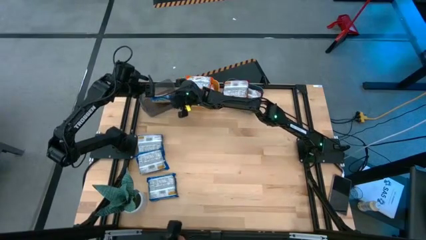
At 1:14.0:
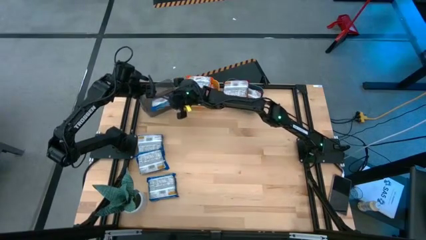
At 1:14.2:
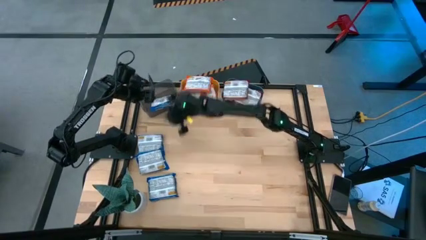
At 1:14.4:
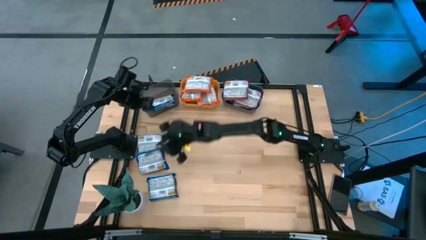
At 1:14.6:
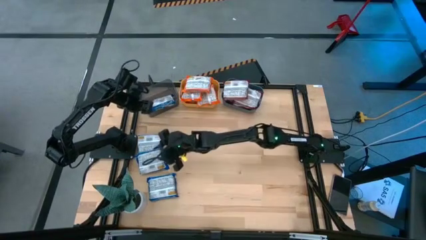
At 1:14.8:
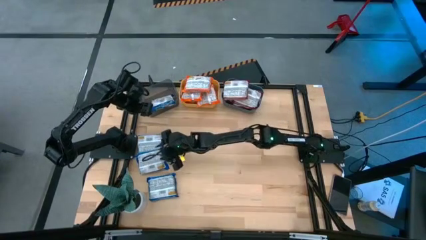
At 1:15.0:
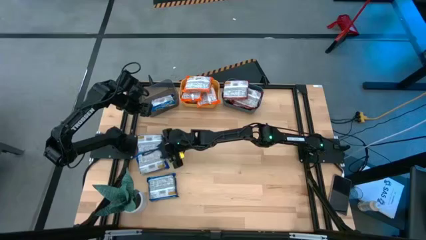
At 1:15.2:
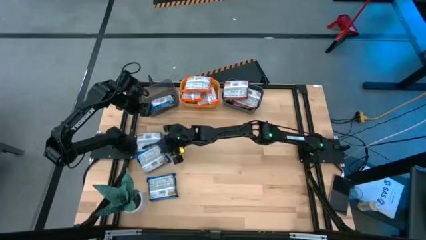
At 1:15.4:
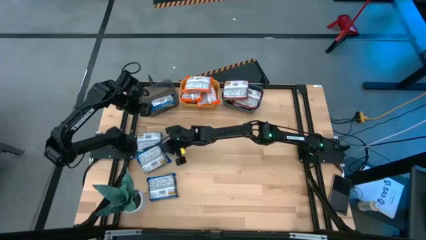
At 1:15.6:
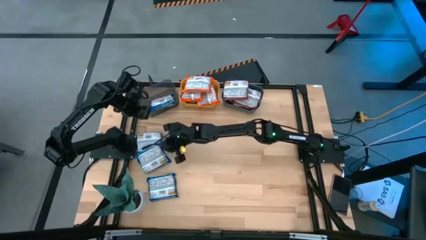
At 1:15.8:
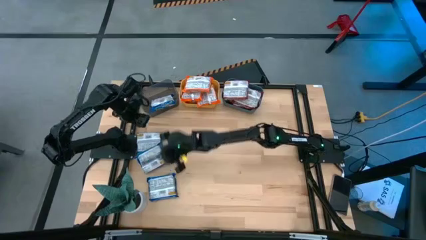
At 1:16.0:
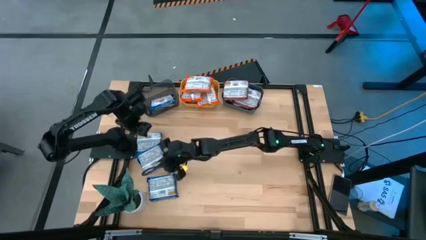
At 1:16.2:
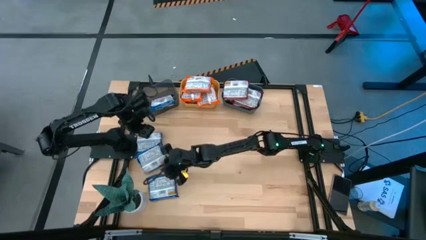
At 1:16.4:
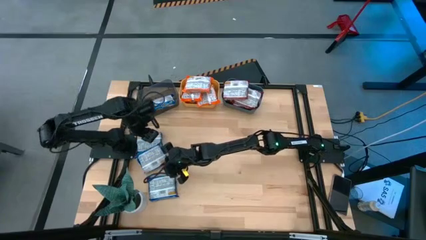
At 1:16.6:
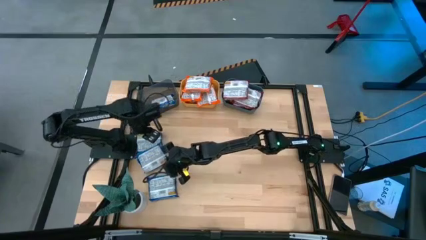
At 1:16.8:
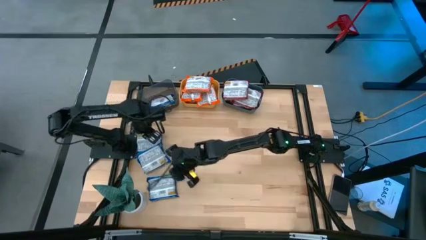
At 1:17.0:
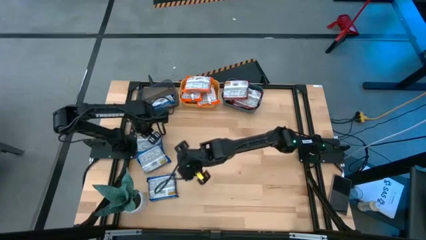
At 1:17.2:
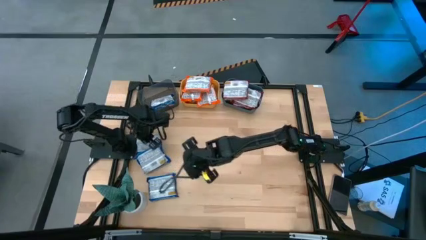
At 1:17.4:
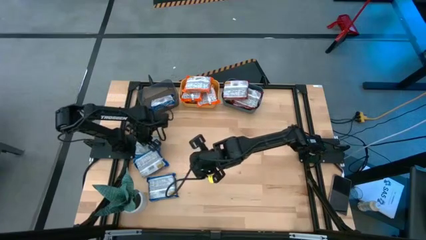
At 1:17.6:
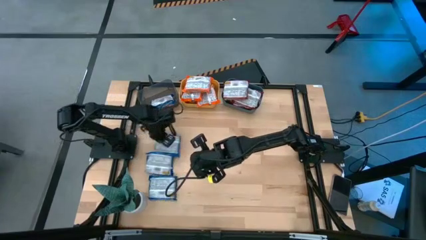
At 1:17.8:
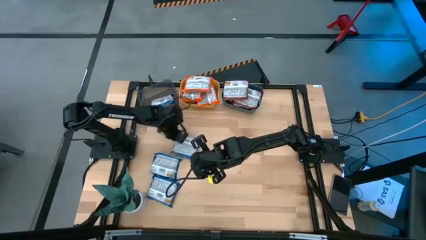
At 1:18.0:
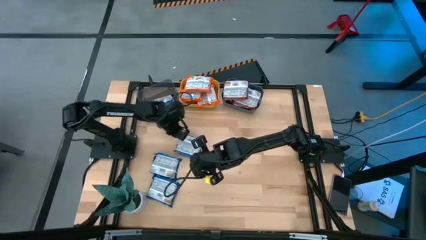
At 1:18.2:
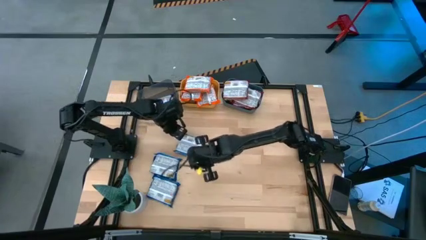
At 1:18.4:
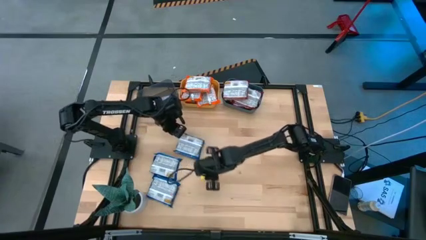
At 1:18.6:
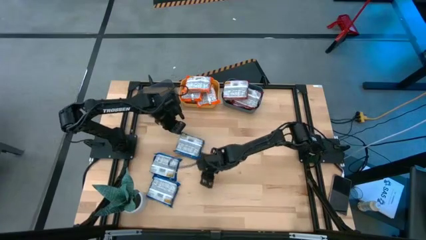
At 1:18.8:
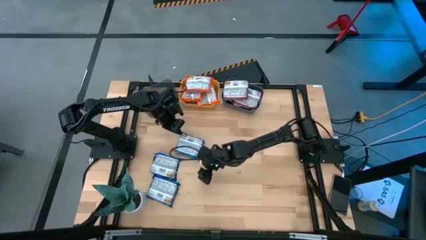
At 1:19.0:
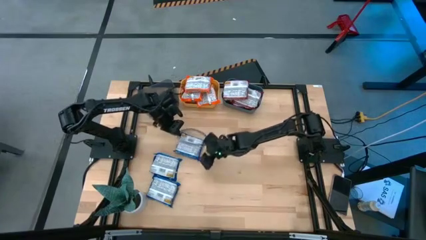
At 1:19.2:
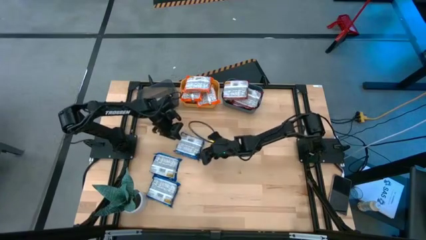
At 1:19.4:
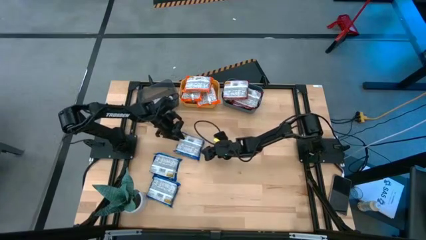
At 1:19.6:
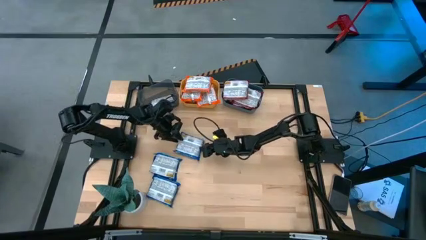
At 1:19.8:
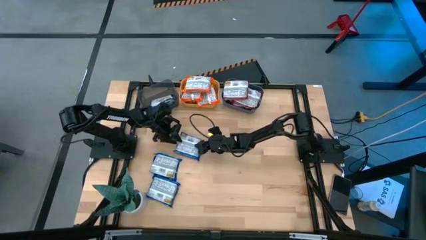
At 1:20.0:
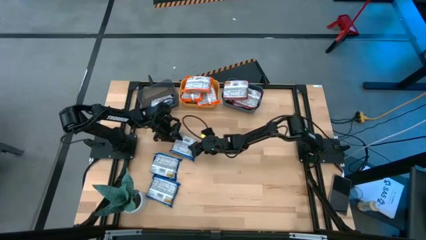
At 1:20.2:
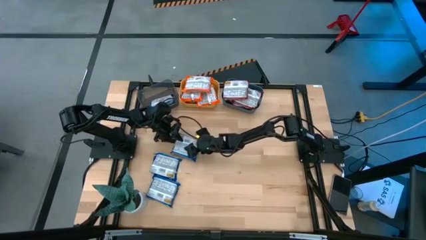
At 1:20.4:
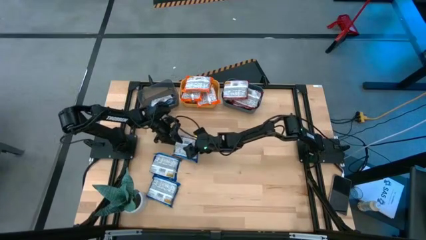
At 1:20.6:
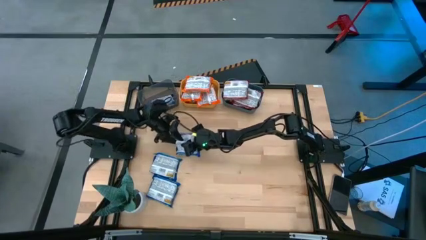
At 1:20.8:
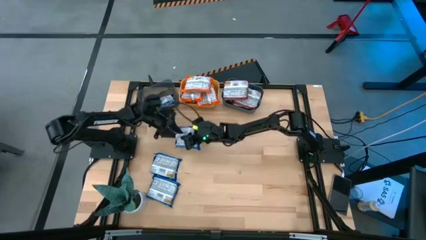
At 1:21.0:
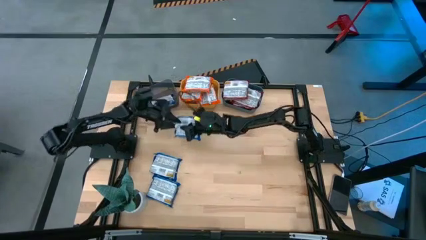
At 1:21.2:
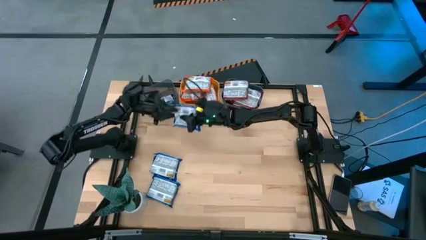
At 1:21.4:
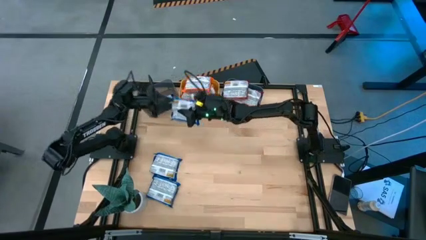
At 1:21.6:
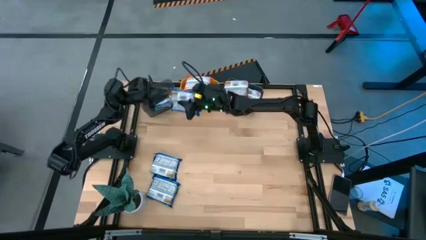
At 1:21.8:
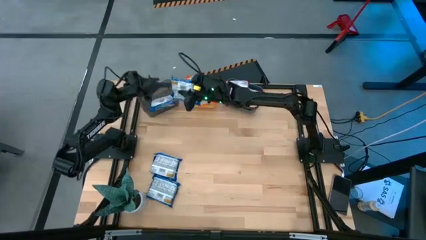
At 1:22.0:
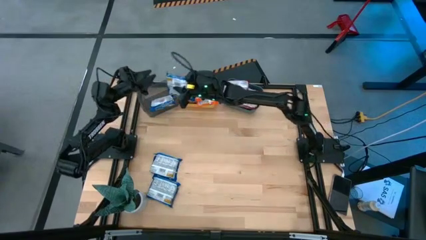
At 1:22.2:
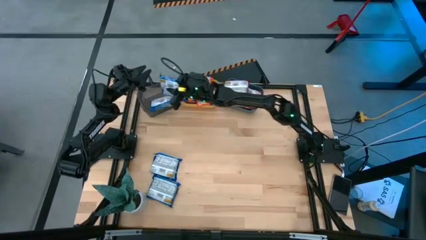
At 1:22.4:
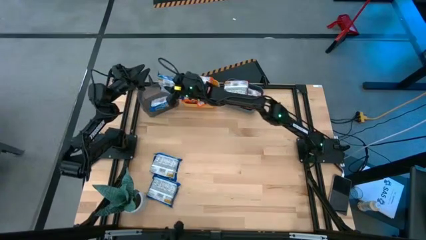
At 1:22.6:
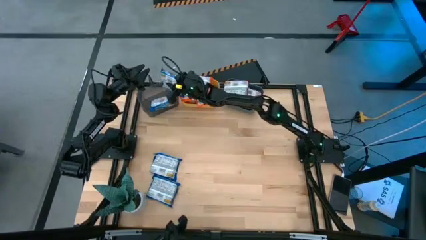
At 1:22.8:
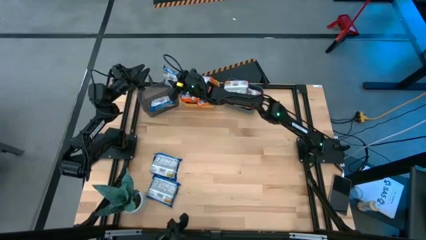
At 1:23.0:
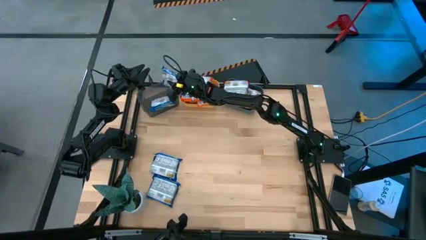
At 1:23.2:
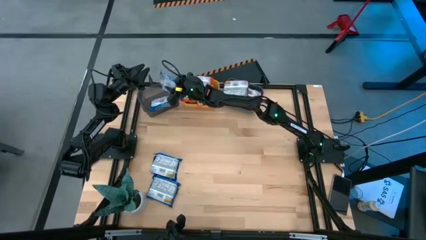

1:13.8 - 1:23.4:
Task: Sort Maruchan noodles
Put the blue noodle pack into the black bin

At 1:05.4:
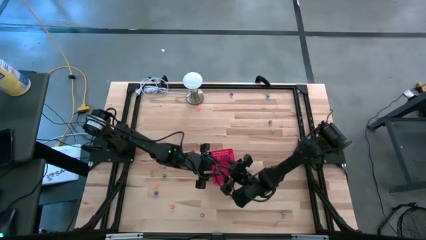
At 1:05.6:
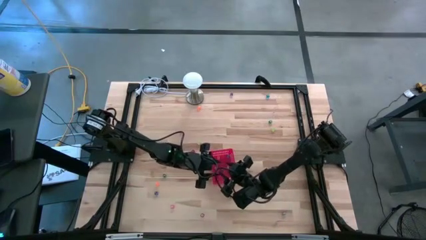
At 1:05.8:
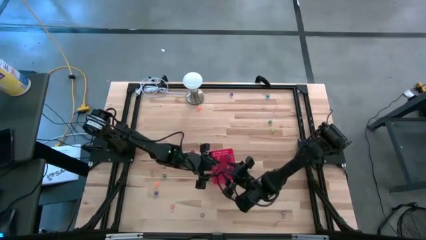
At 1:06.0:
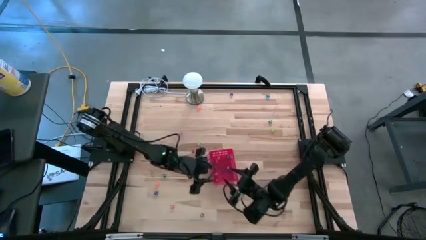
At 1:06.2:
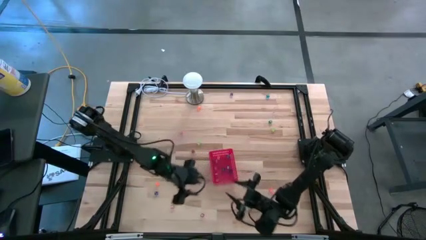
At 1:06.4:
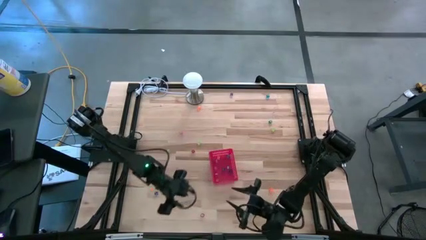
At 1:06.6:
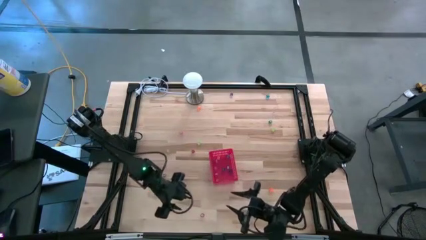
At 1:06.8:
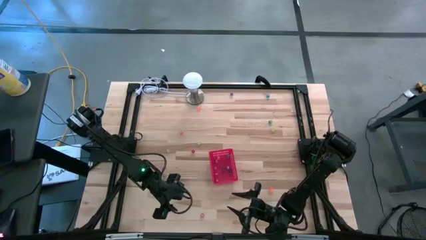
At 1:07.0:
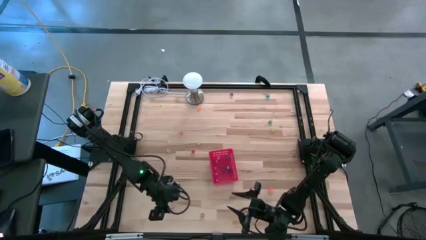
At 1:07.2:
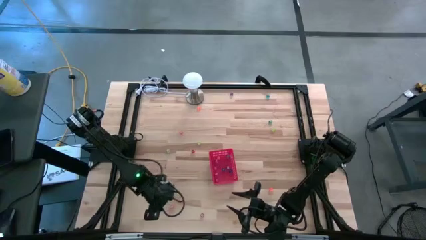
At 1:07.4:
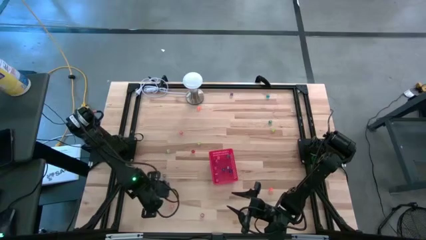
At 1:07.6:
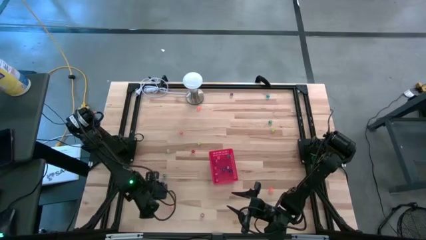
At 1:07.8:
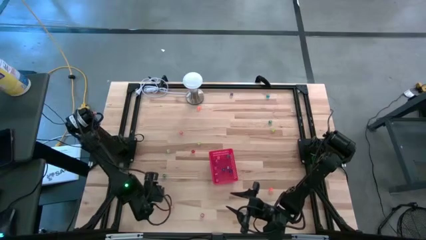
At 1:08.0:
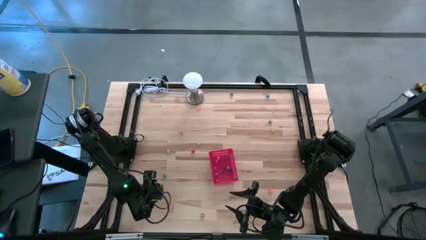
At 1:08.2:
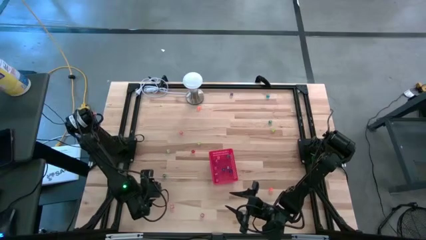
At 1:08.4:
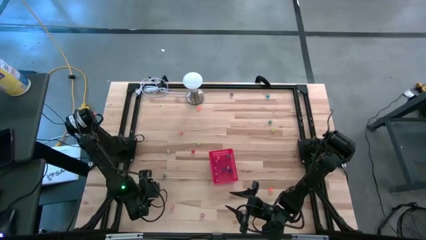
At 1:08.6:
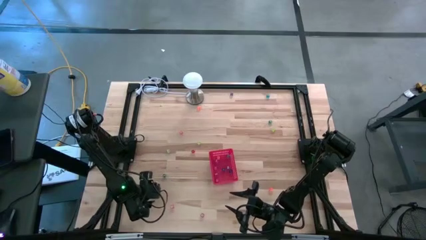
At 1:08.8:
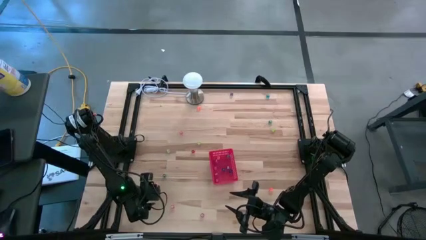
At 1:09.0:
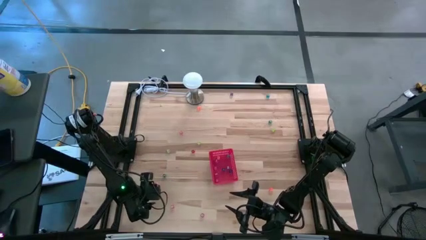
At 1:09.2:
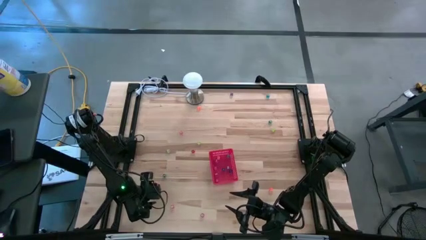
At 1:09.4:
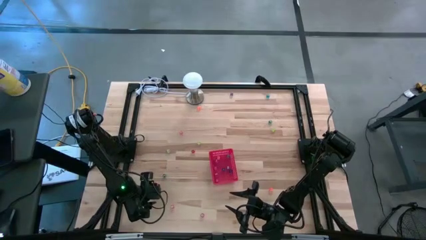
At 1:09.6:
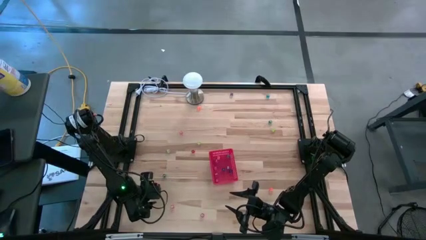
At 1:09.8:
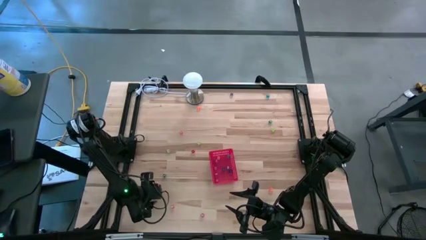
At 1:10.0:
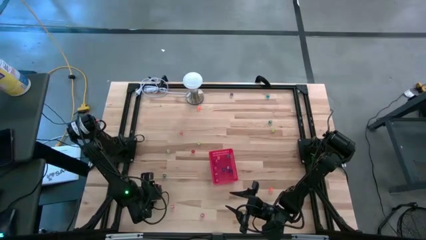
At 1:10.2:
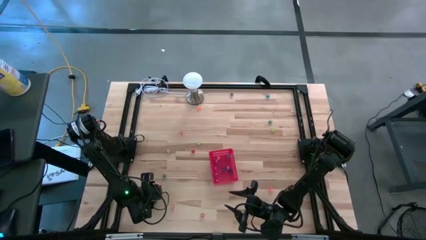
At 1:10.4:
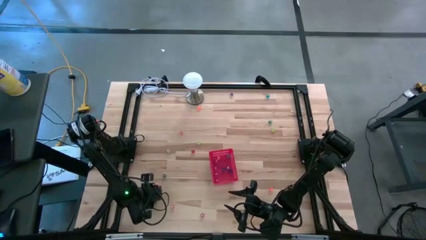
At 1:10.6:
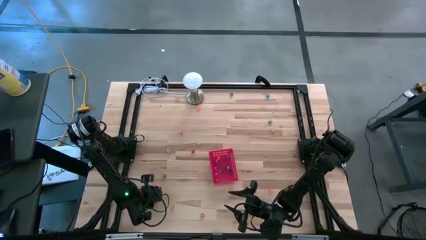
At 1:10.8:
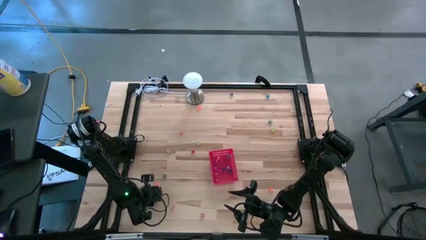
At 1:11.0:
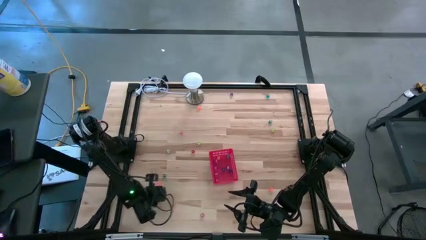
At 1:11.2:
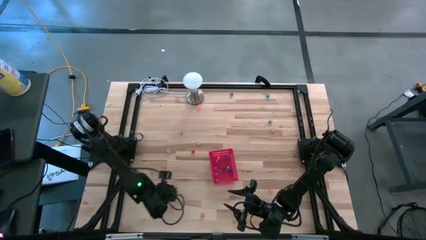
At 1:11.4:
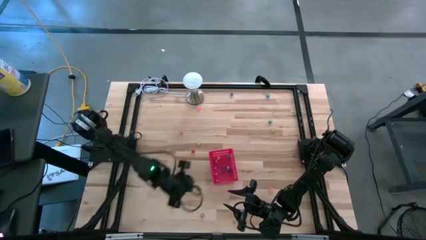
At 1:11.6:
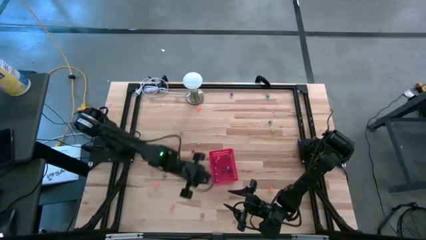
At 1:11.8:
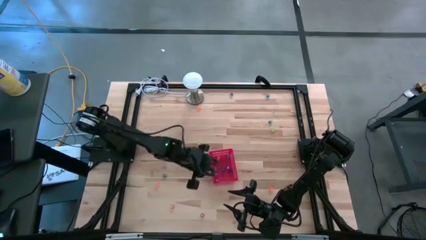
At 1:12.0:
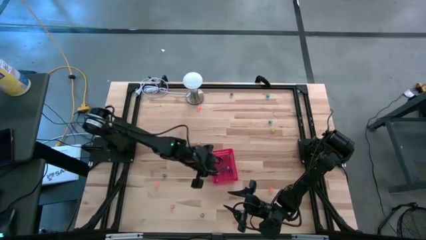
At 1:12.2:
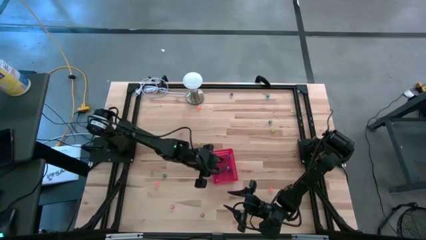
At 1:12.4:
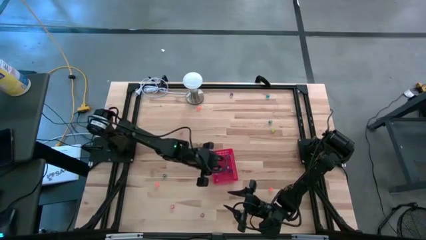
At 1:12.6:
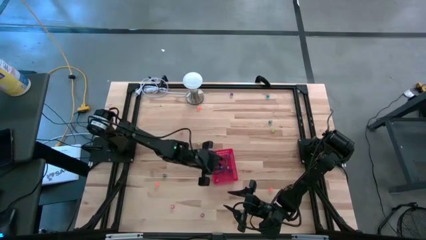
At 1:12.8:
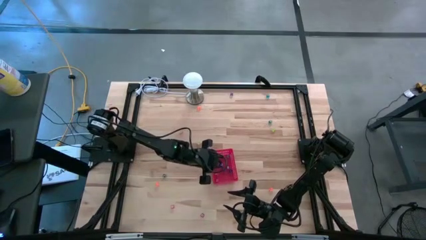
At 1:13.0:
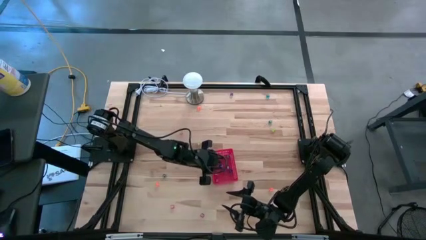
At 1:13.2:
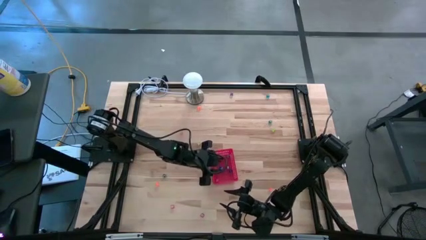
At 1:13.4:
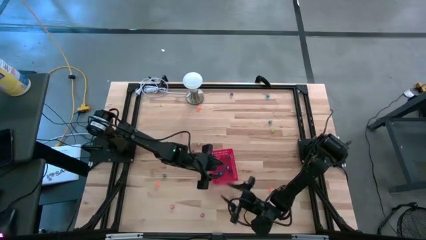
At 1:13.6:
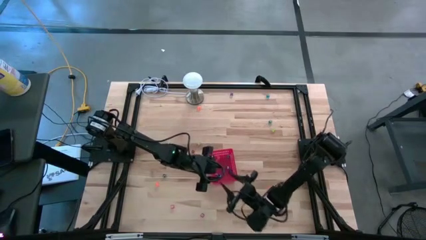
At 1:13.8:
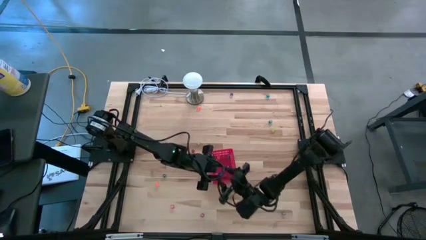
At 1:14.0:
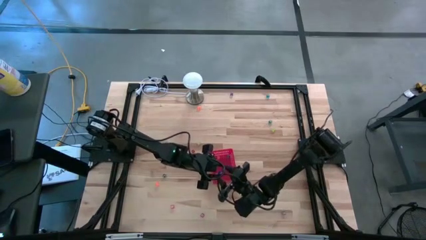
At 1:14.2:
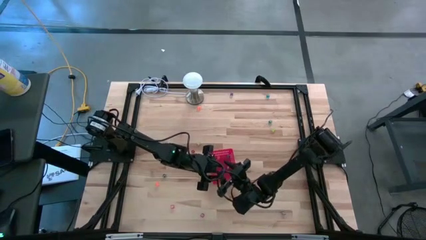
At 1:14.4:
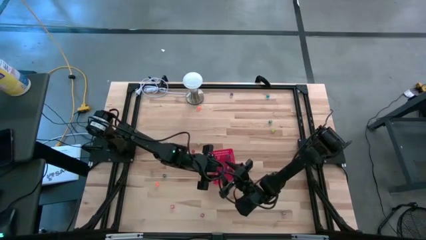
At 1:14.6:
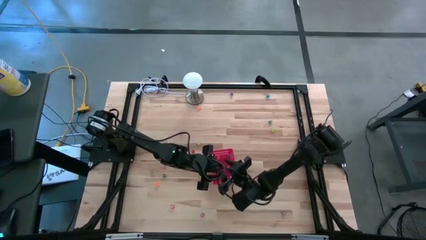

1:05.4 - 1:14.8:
Task: Pick & Place Dice
Put the dark blue die into the red basket
